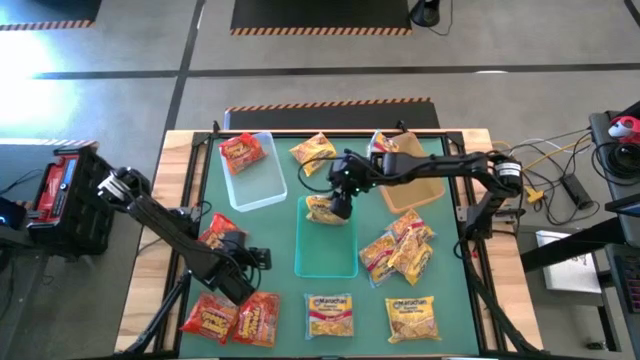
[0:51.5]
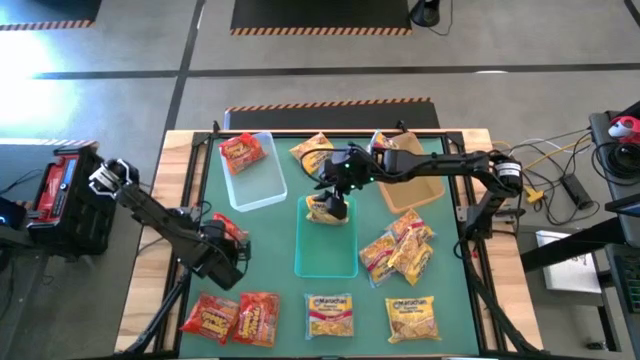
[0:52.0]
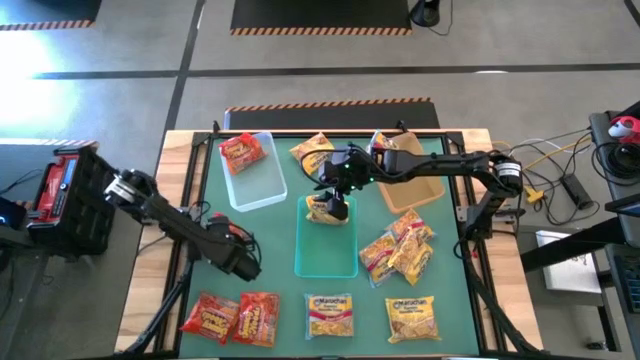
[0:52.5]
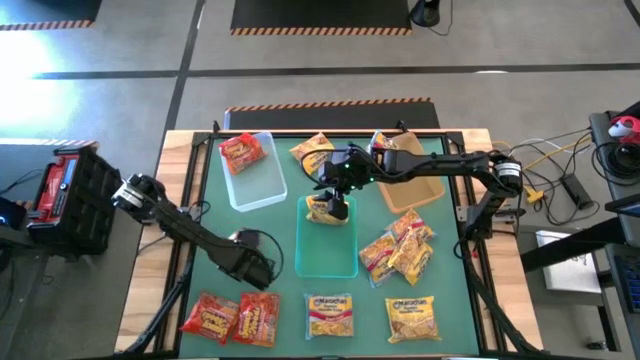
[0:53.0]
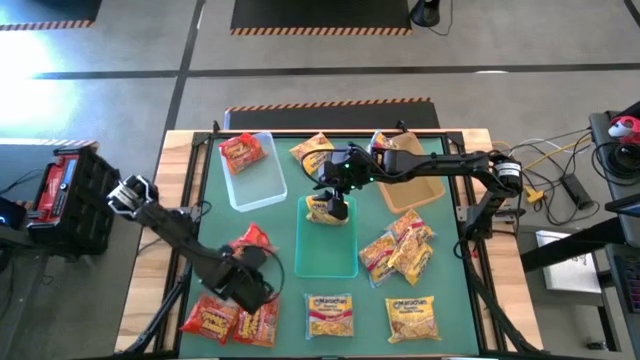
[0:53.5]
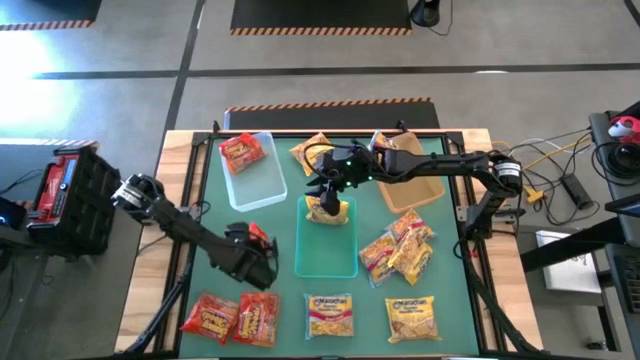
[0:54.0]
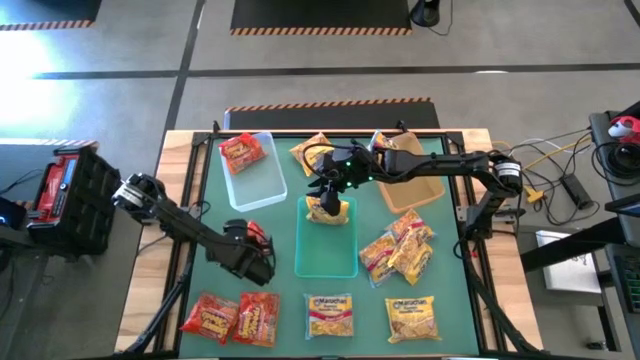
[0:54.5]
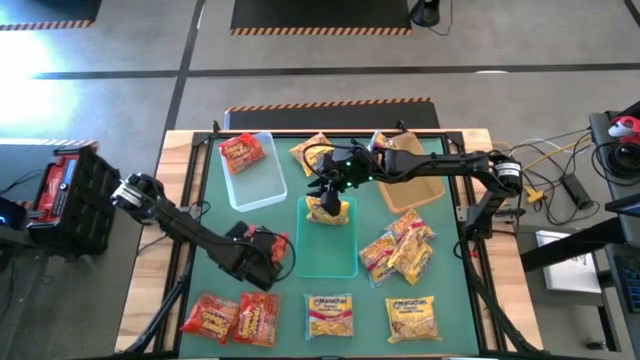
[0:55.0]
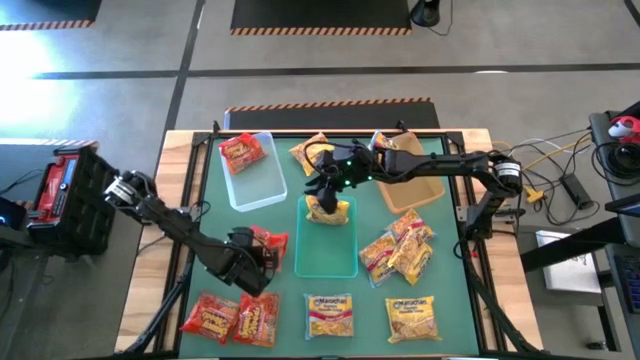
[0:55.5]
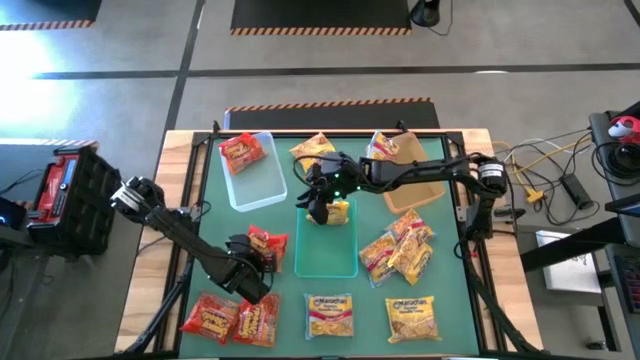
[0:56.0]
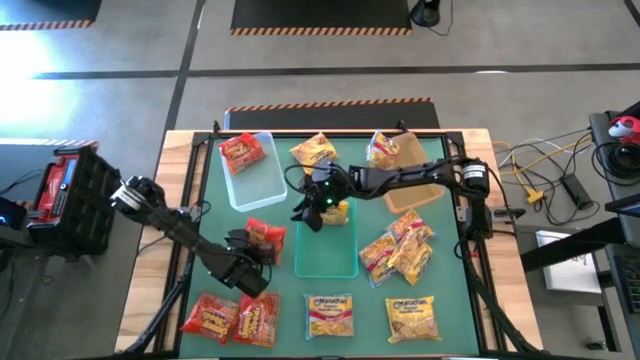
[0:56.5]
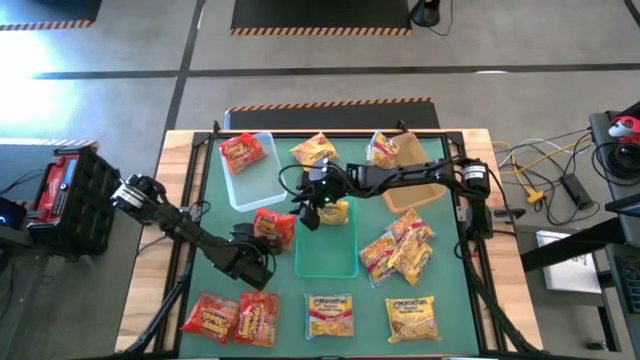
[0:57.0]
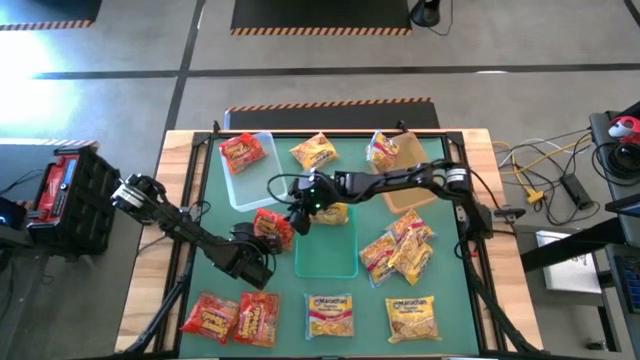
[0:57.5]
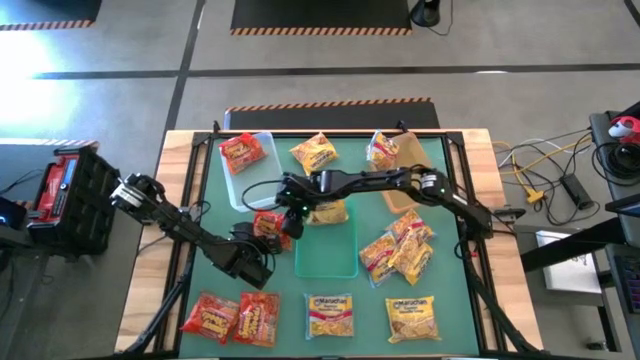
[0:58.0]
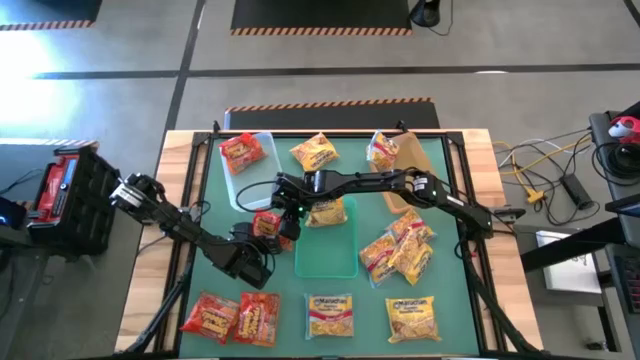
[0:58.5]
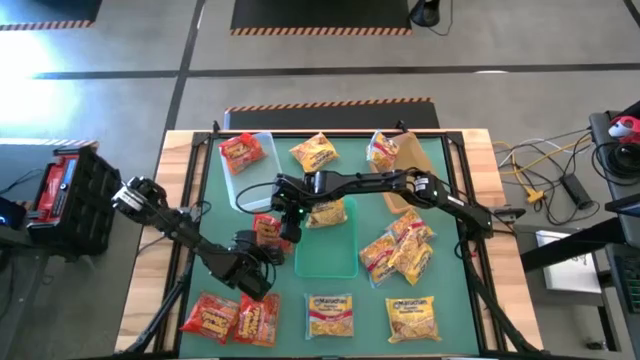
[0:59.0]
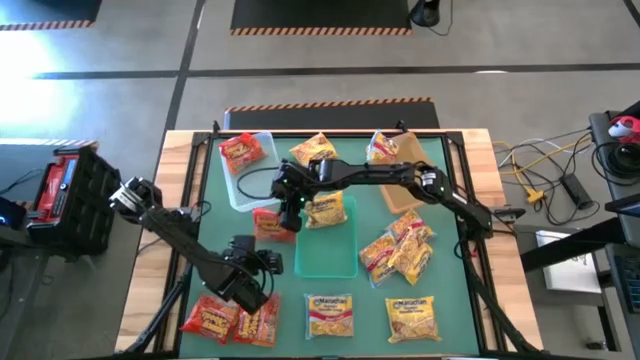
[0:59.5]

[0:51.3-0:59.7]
Task: Sort Maruchan noodles
Put the orange noodle pack into the transparent bin

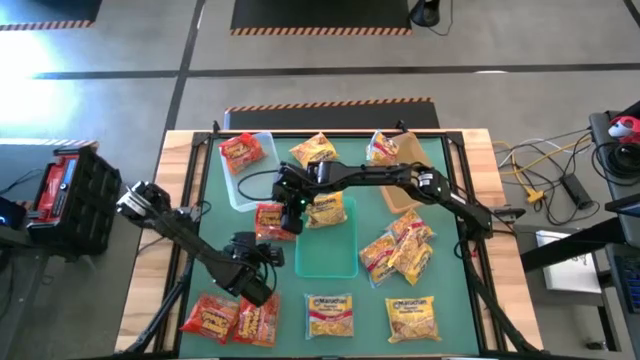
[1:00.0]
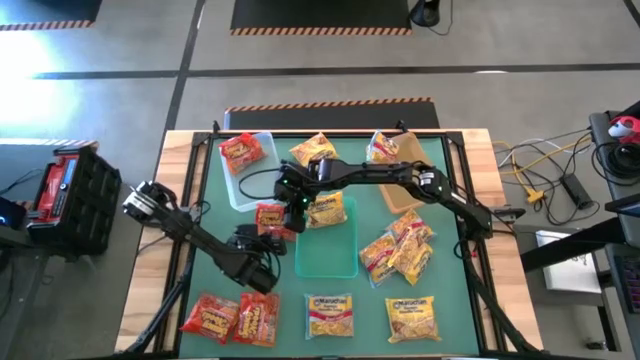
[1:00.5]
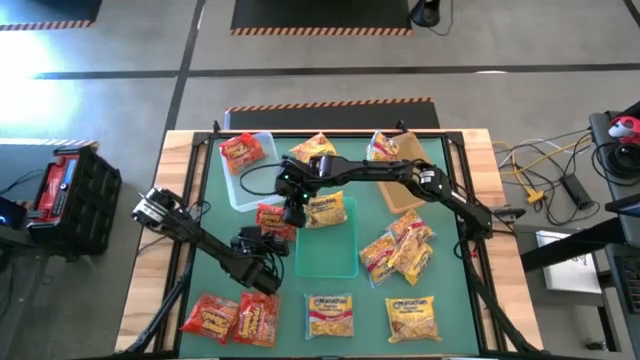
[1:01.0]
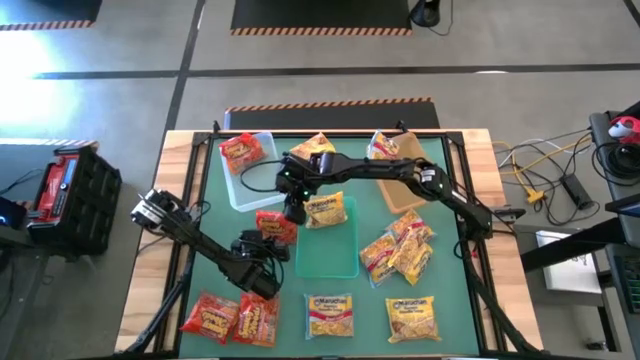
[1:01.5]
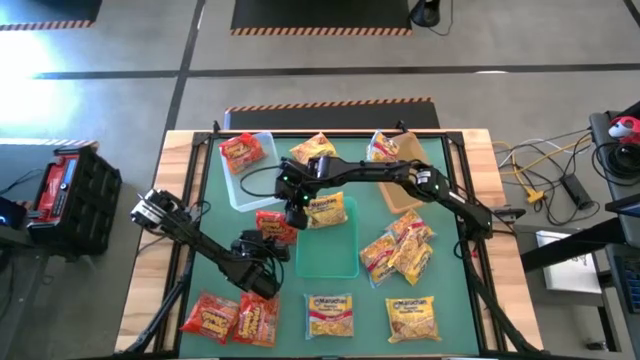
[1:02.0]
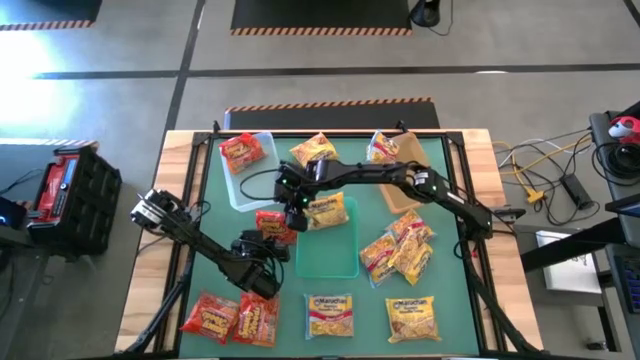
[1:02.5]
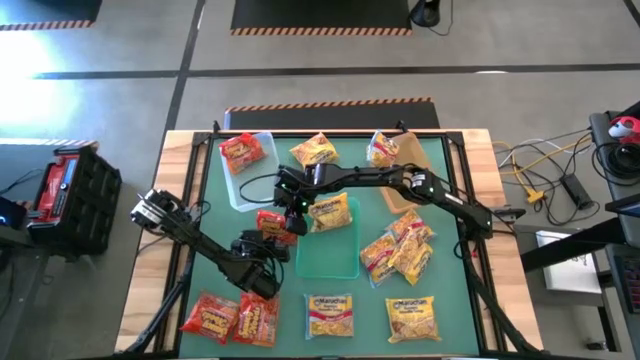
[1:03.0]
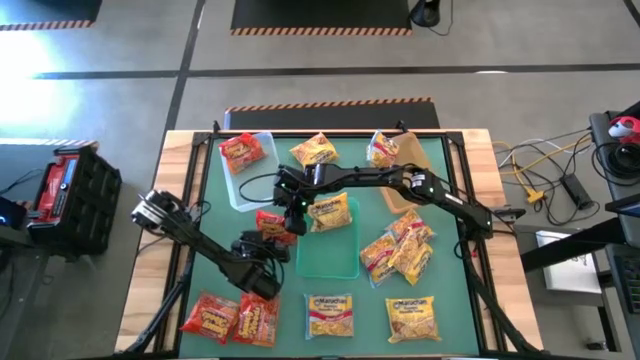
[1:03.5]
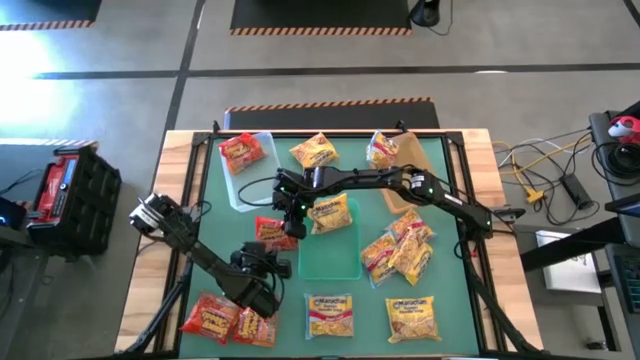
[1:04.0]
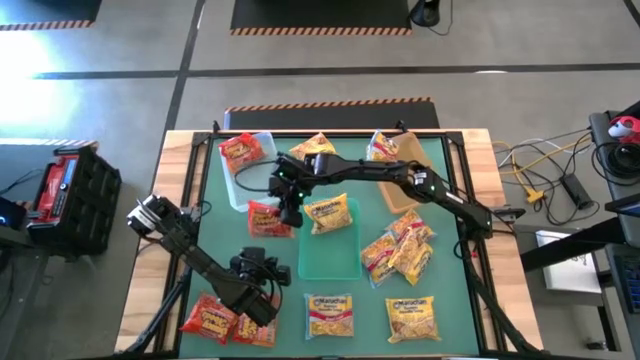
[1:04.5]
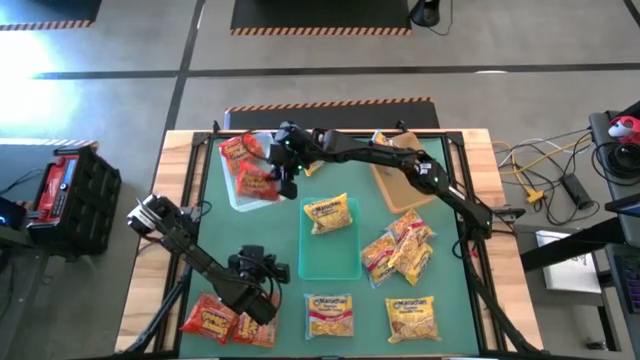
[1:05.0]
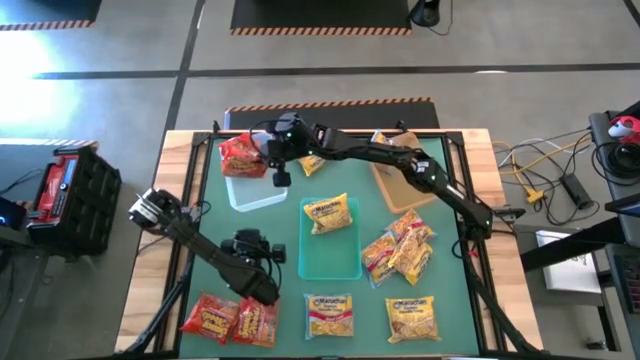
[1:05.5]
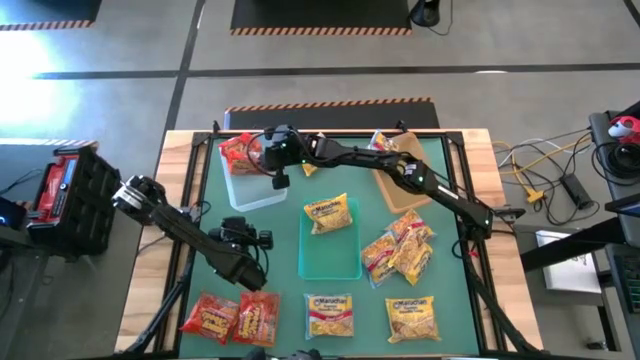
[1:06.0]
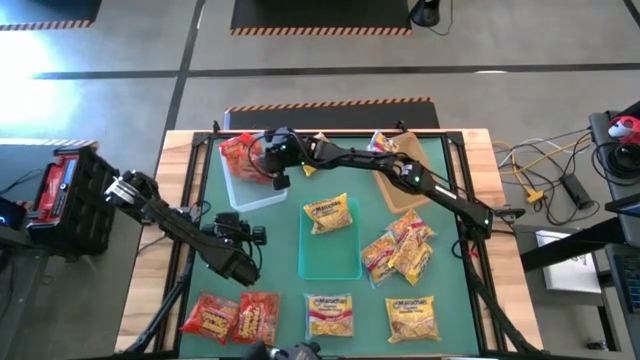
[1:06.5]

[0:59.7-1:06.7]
Put the orange noodle pack into the transparent bin

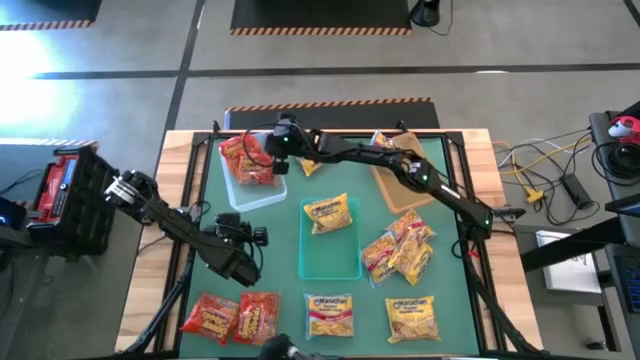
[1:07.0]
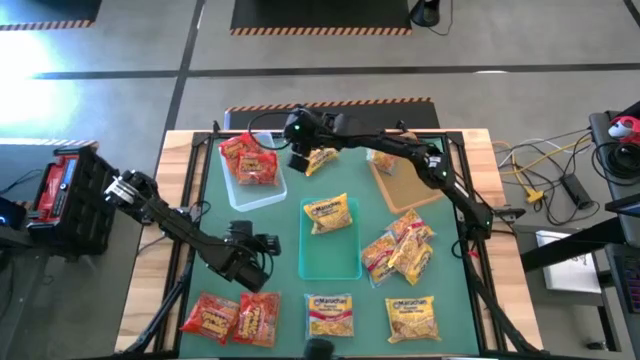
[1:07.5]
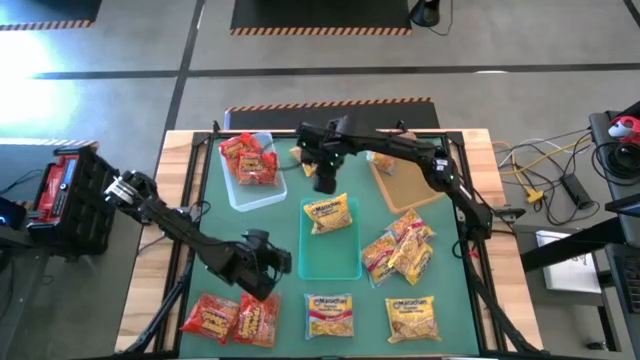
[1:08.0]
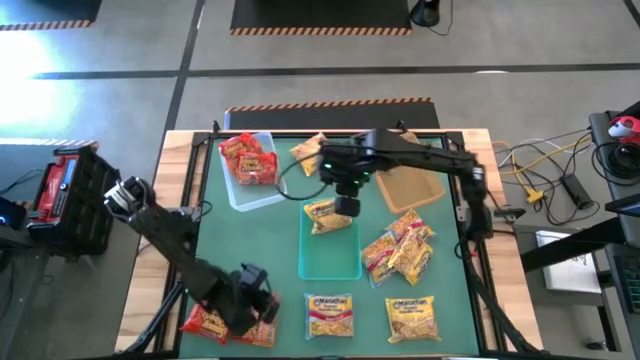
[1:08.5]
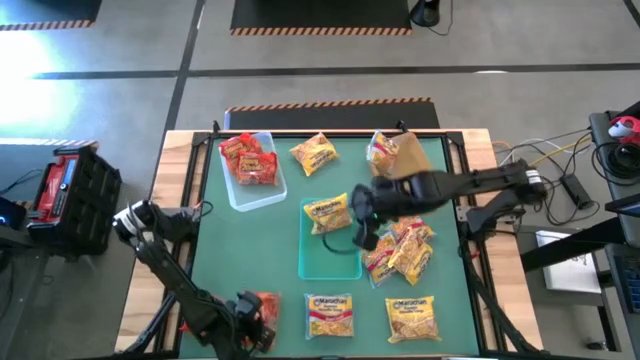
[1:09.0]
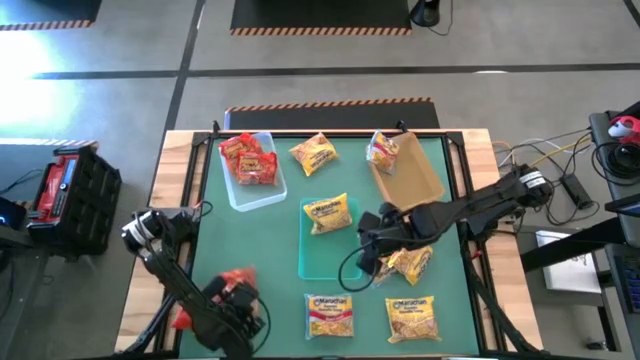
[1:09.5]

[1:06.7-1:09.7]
Adjust the orange noodle pack on the table

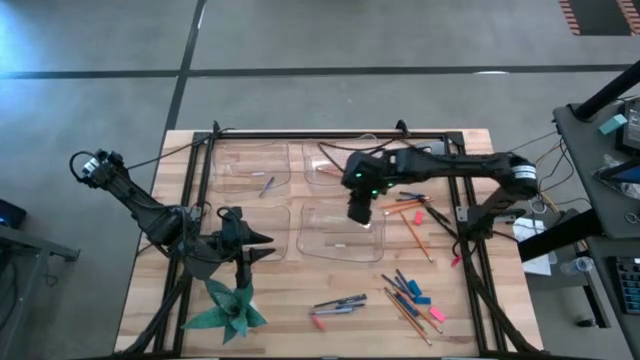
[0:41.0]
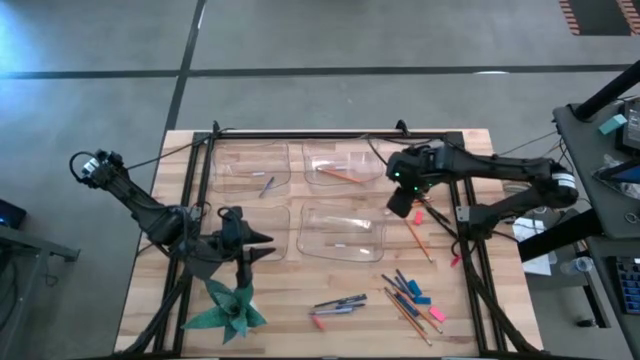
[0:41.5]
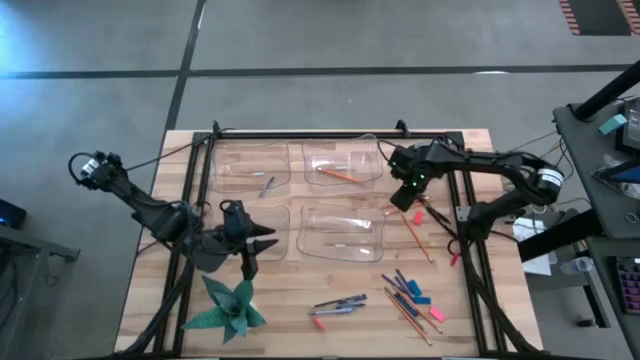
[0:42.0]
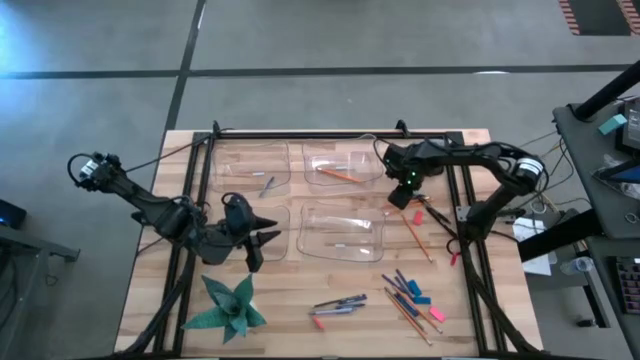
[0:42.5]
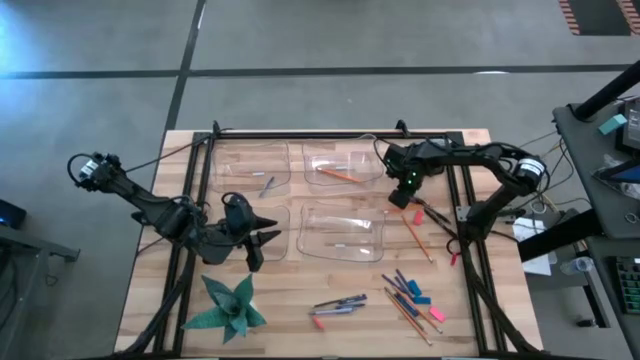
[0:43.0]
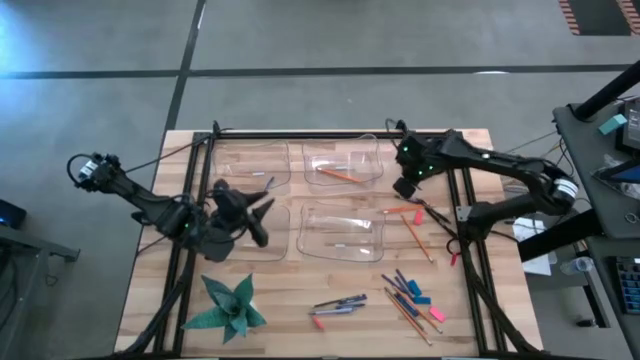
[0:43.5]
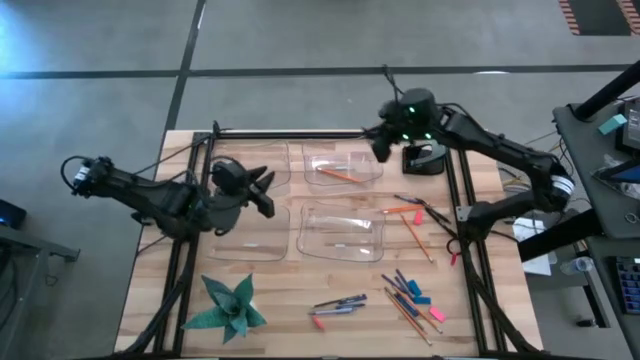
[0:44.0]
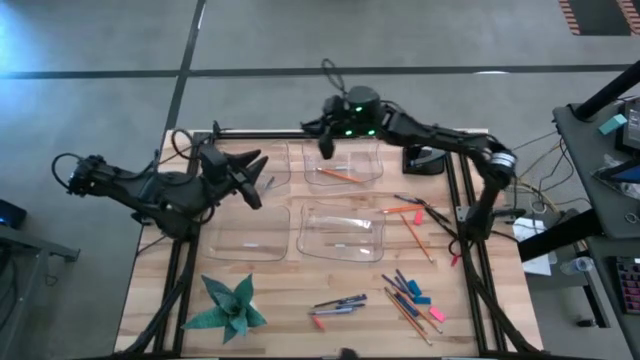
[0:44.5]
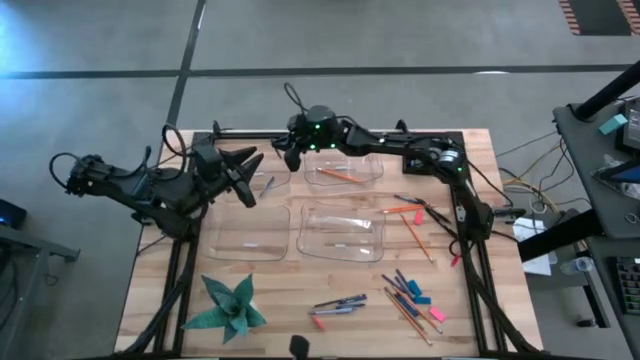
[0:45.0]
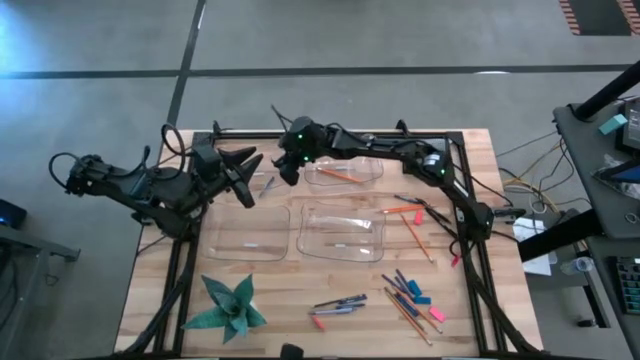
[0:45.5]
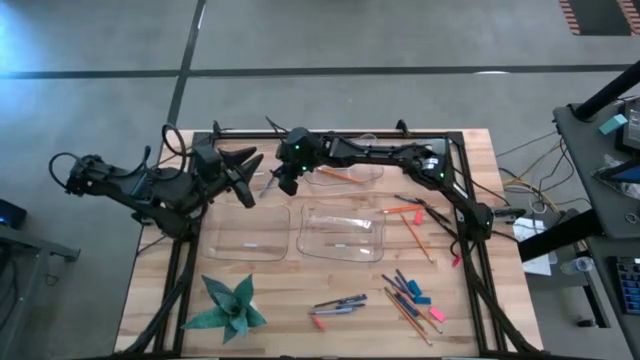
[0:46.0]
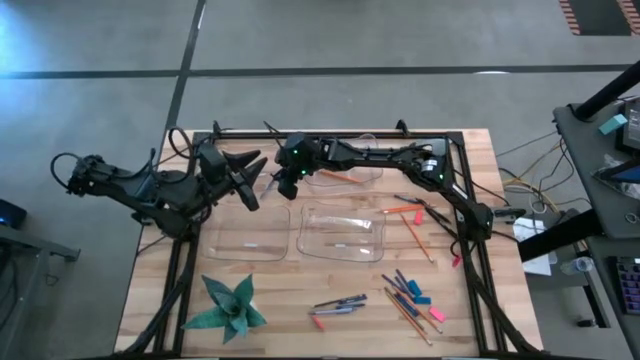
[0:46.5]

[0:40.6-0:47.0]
Task: Sort crayons/erasers/pens/pencils in bins
Put the blue crayon into the top left transparent bin
